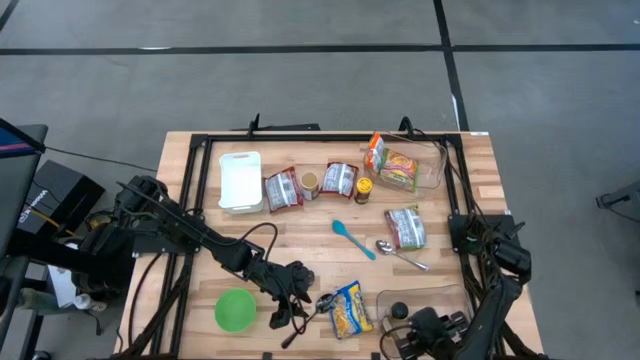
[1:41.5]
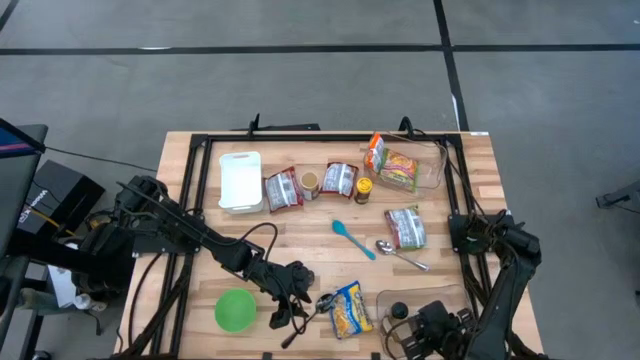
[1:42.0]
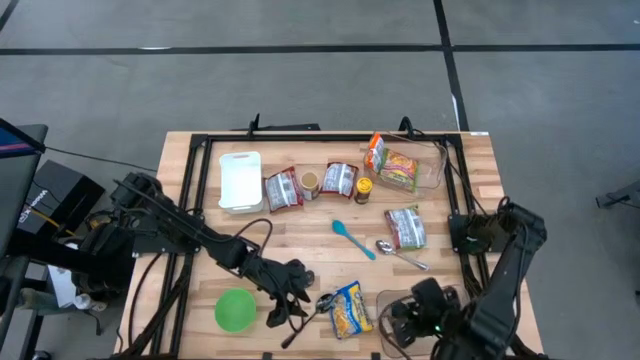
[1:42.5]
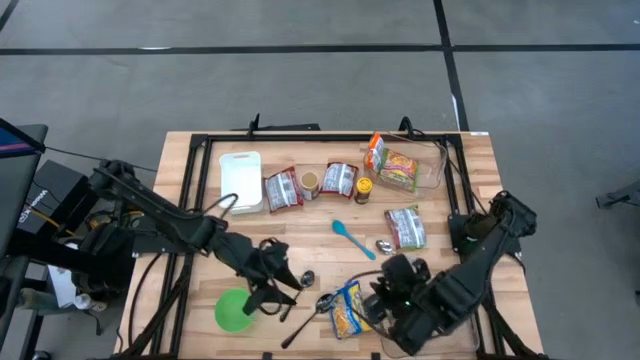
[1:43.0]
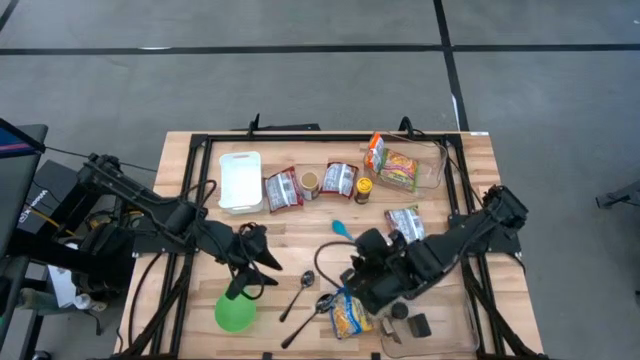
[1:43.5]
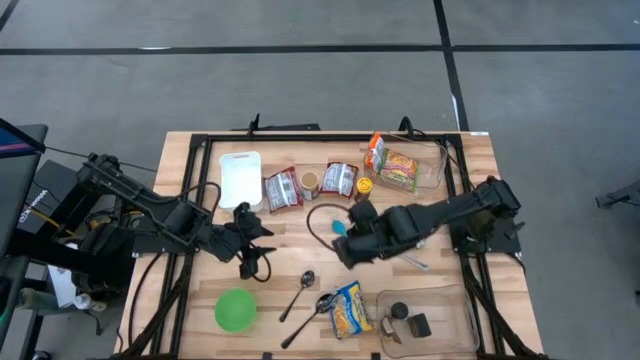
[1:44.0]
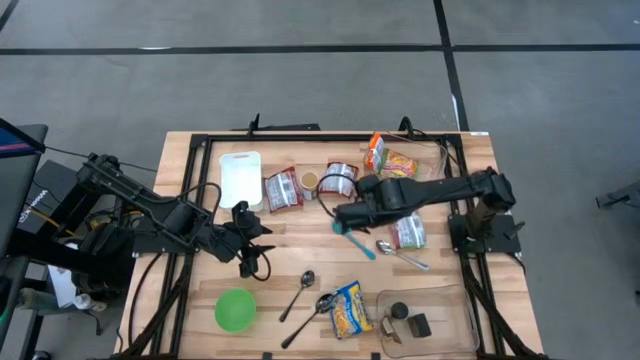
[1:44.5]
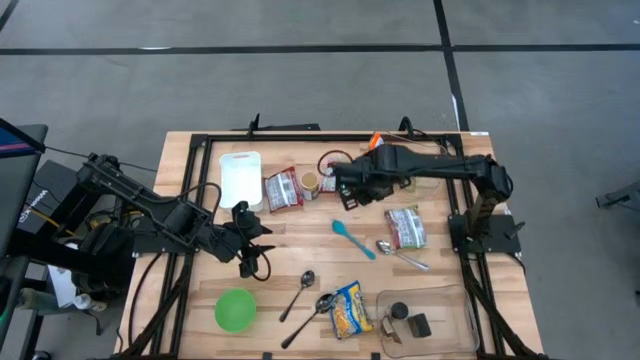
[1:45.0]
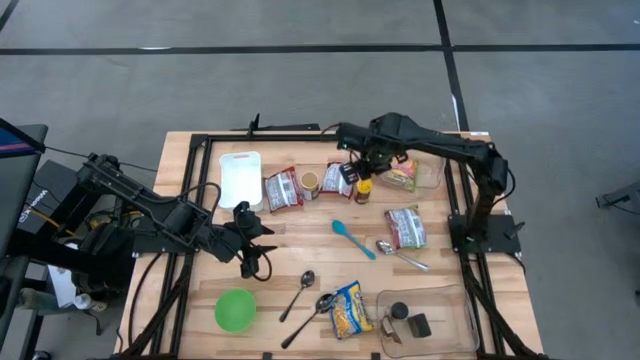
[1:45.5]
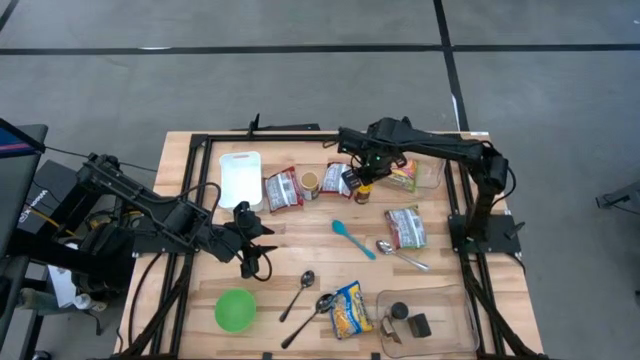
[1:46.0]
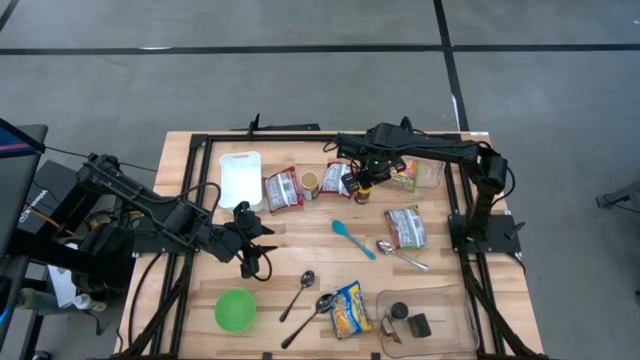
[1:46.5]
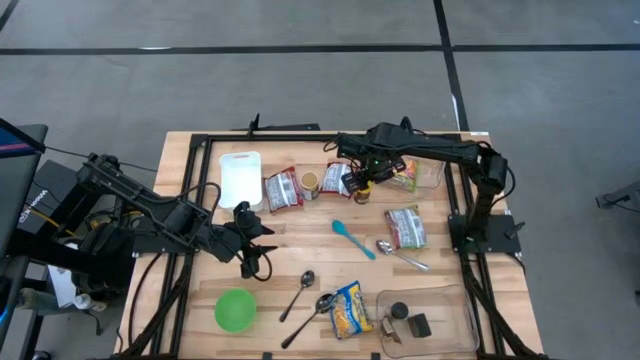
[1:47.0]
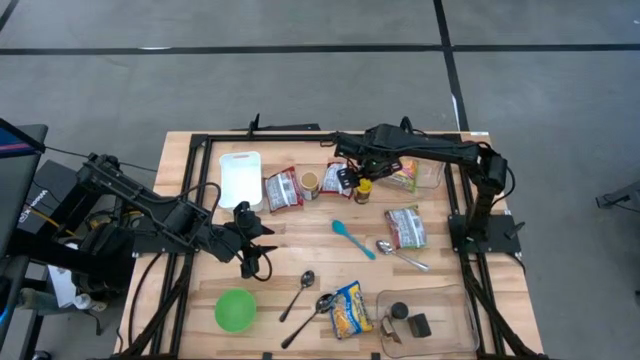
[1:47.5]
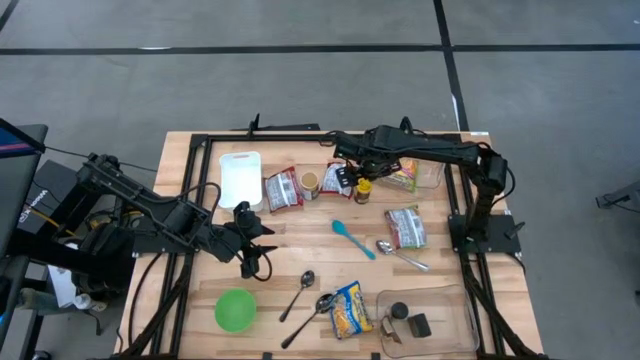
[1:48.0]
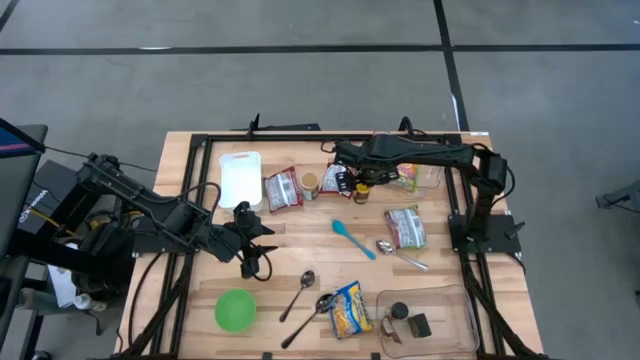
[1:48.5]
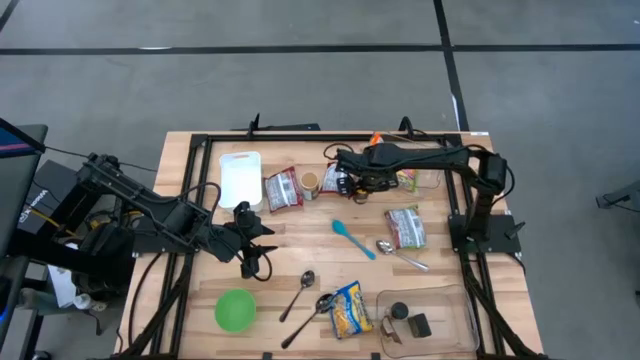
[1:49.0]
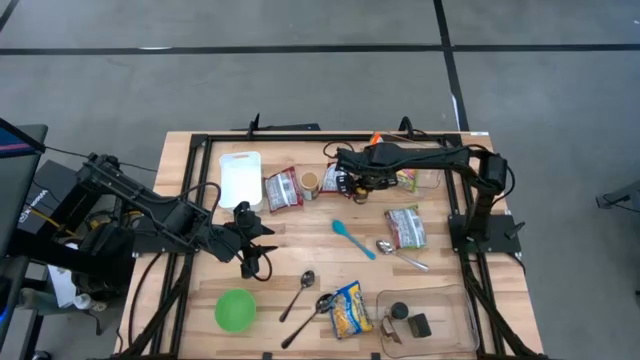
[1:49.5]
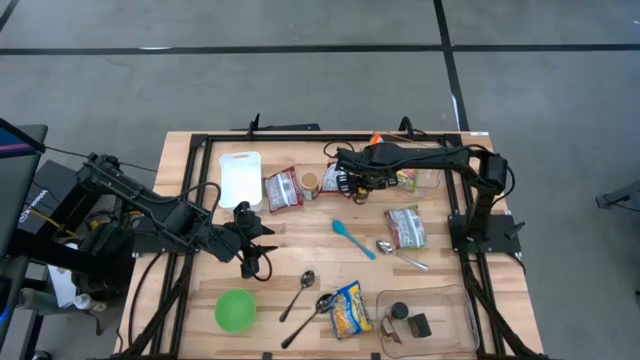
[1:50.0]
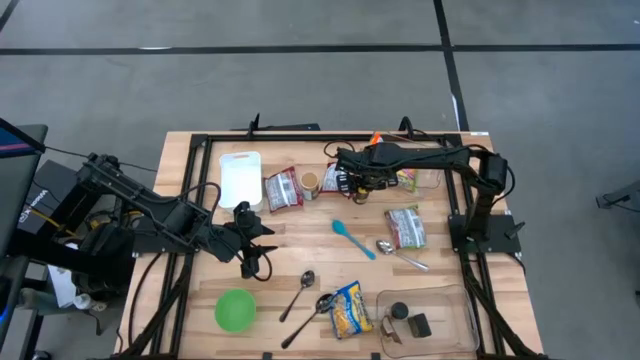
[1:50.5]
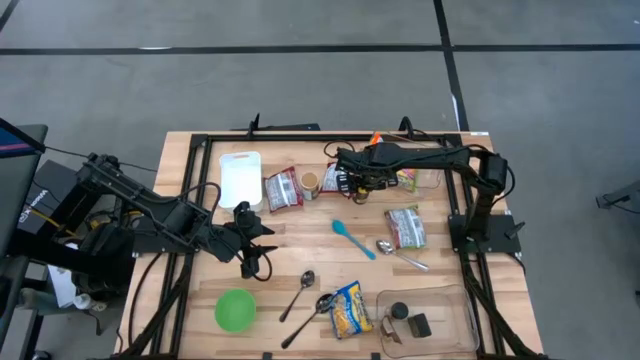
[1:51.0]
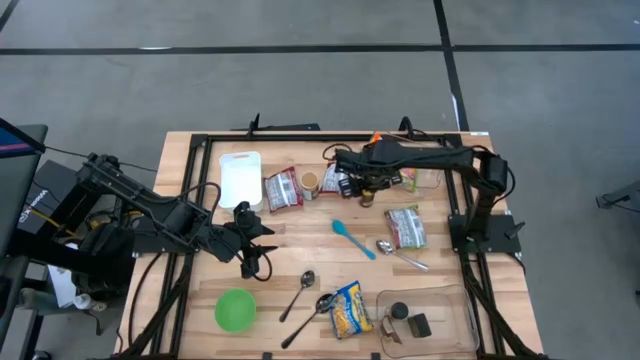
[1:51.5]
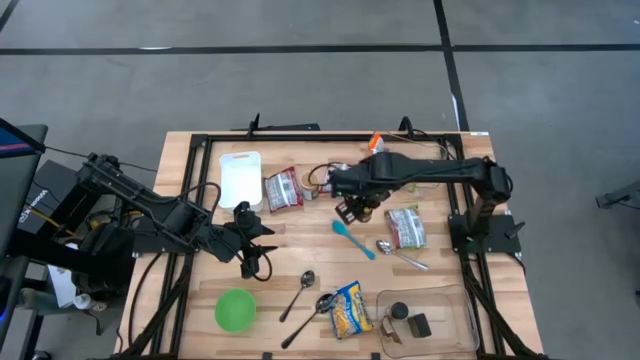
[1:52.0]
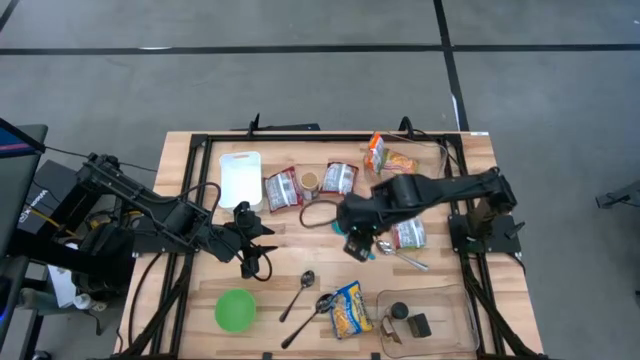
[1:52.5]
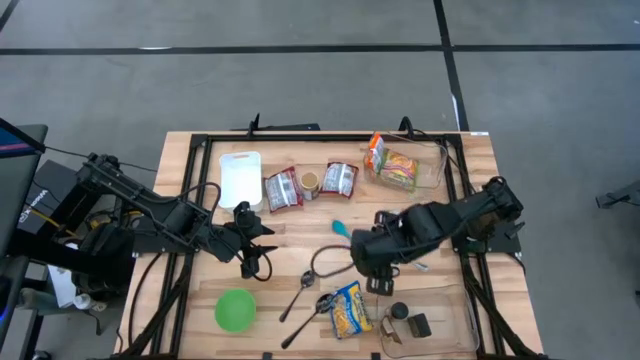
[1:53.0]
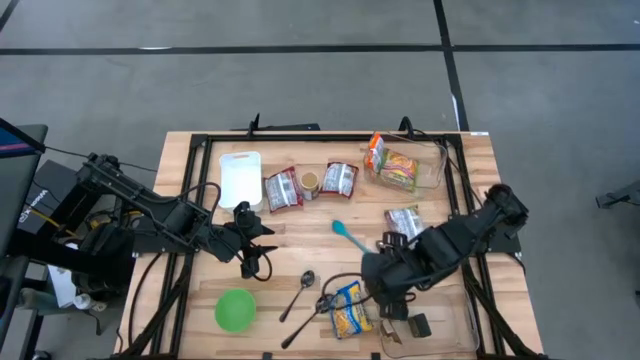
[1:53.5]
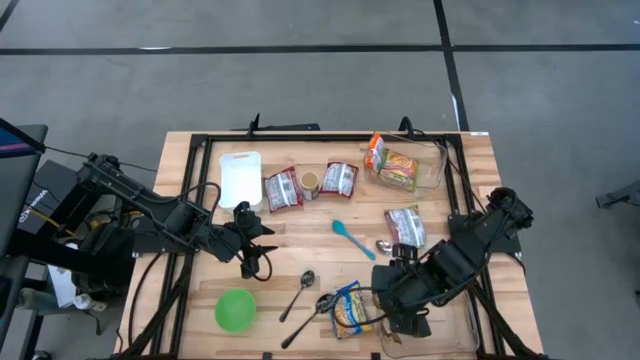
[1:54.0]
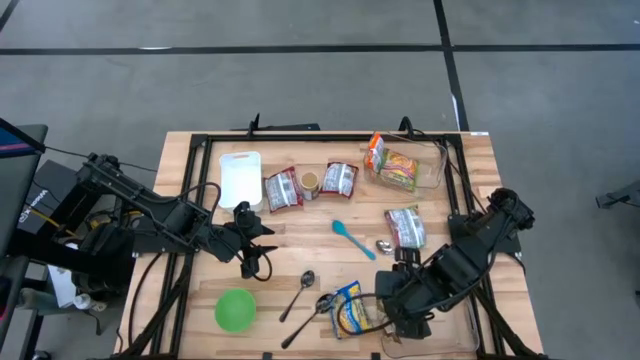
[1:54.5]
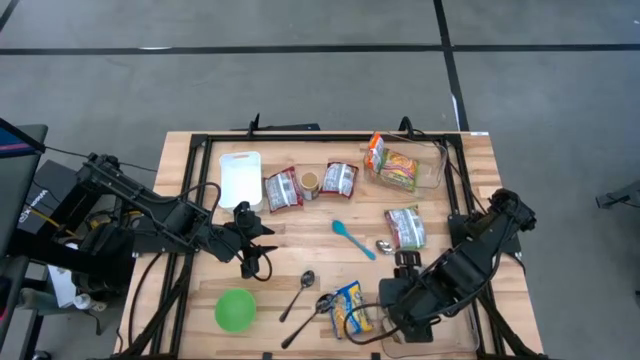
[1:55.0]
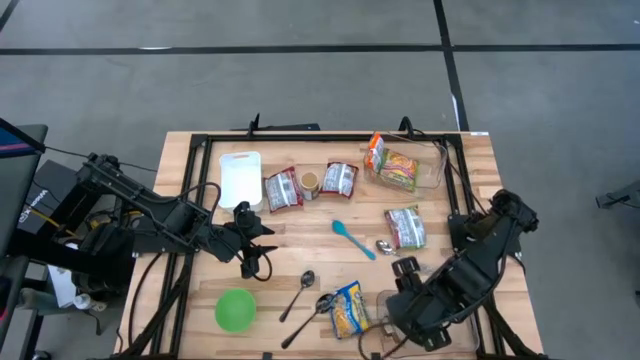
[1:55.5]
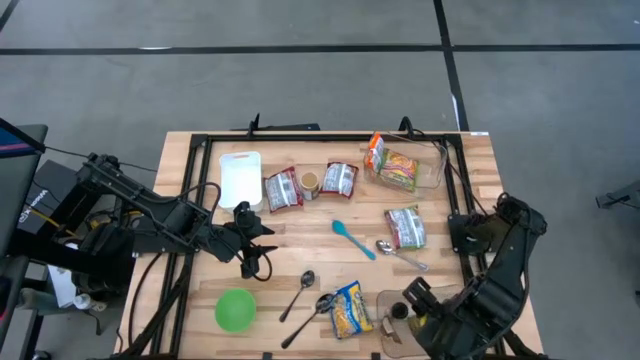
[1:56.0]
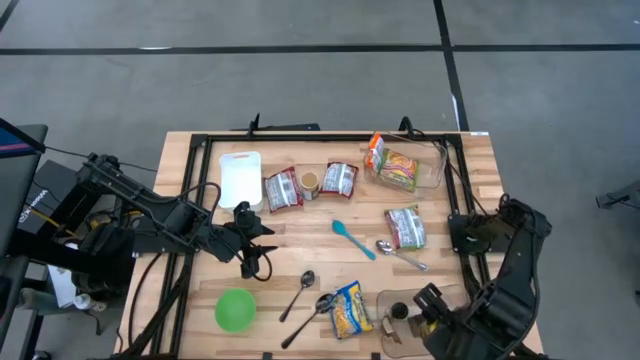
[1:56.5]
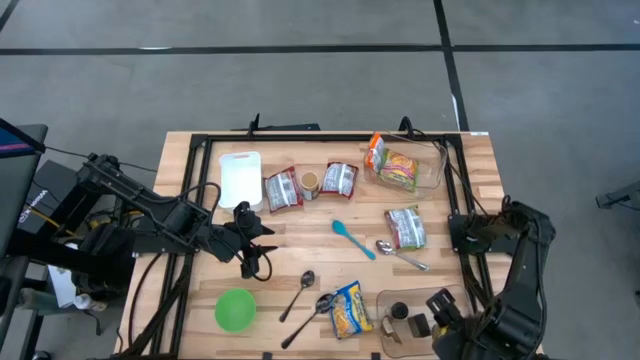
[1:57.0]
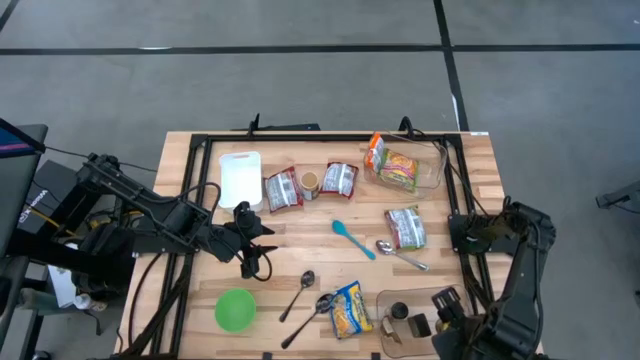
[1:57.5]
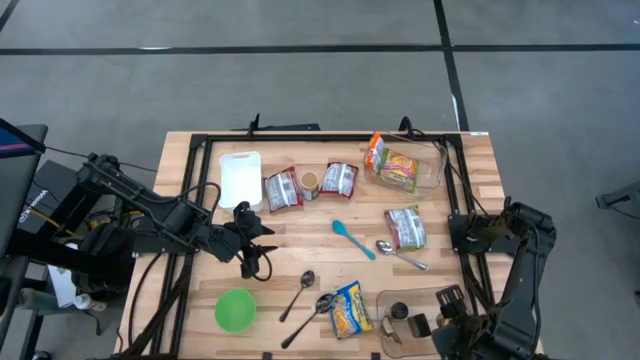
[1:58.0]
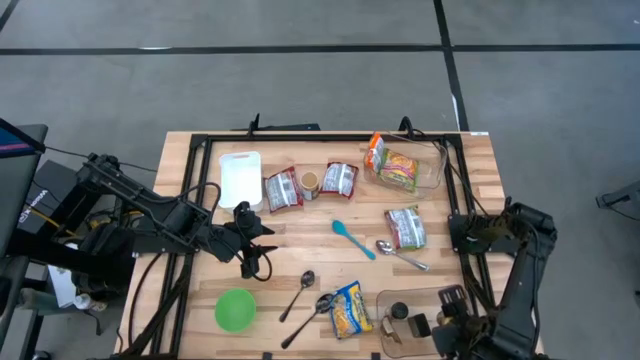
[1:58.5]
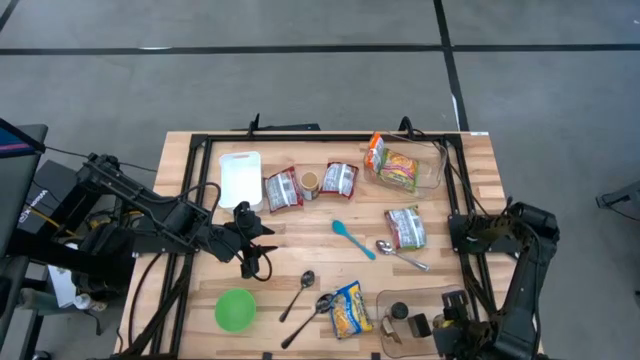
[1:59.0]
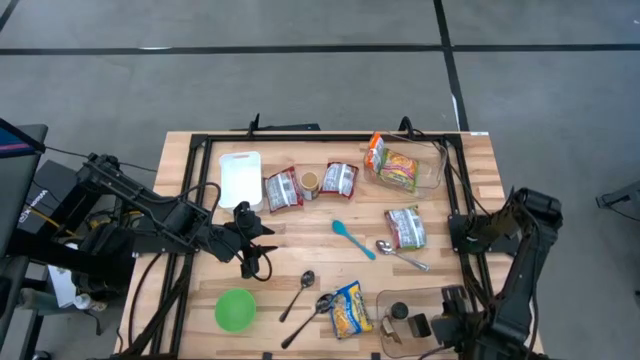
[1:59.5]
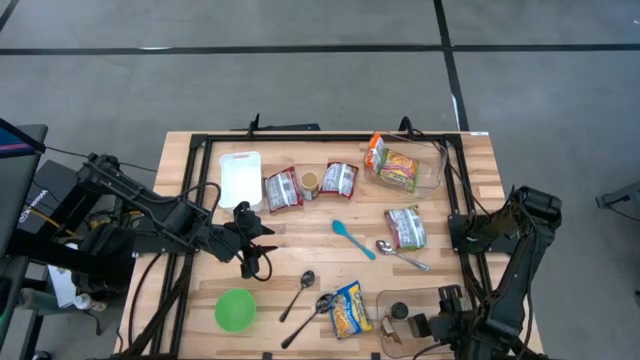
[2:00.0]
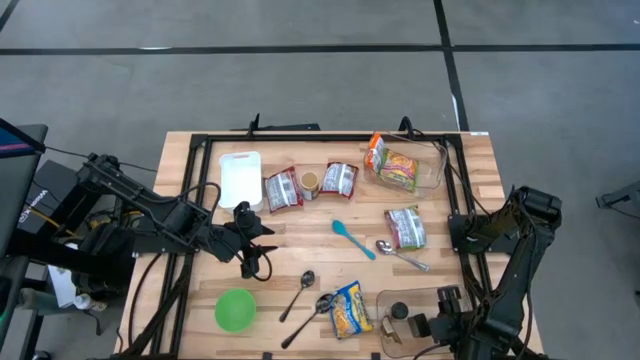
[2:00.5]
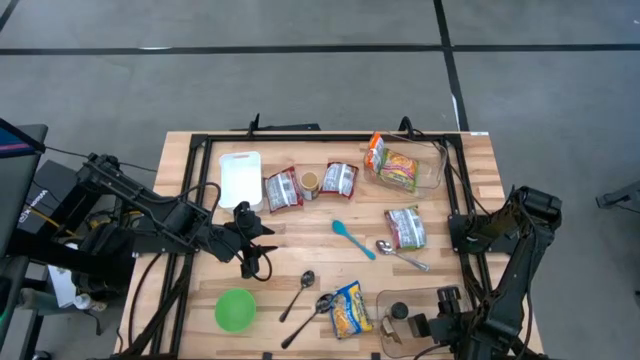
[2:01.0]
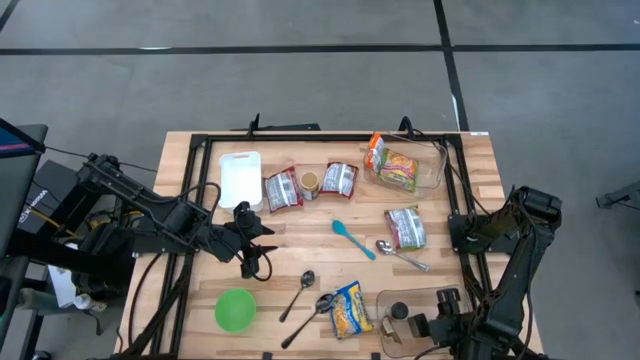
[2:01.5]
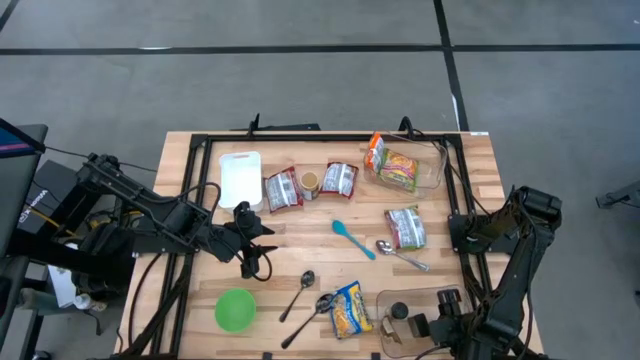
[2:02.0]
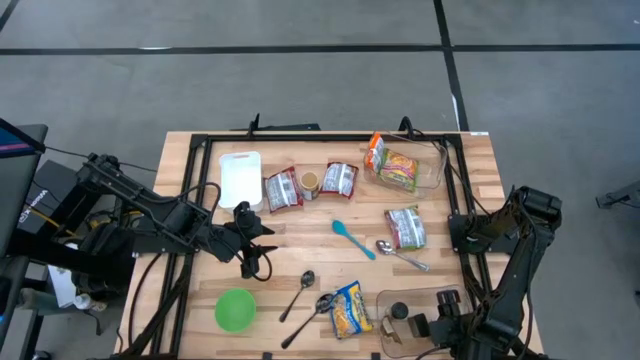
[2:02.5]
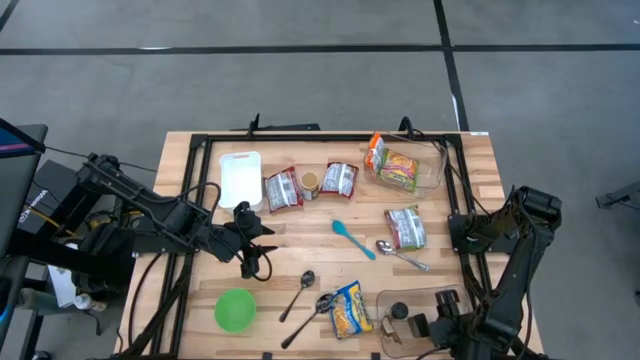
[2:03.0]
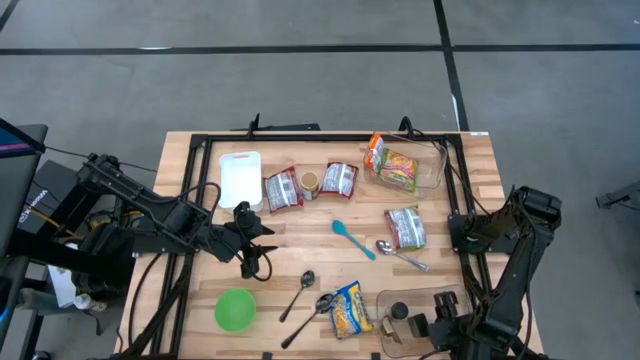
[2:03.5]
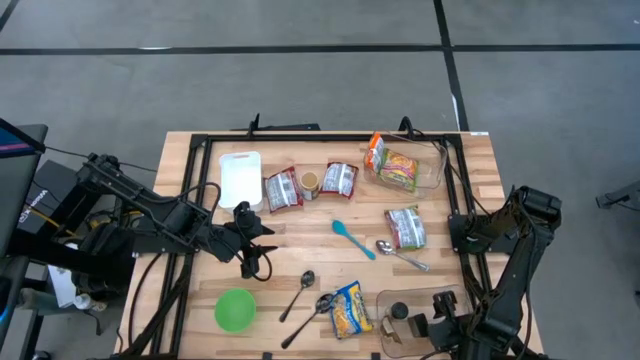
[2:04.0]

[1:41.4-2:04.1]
Task: Pick & Place Food Item
Put the yellow spice bottle into the bottom transparent bin
